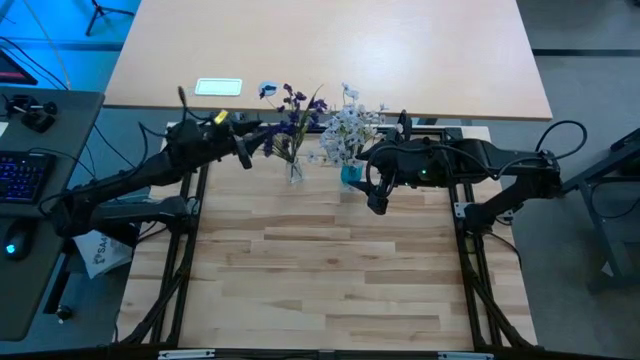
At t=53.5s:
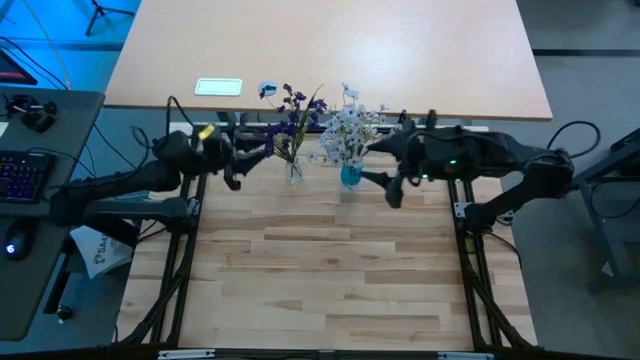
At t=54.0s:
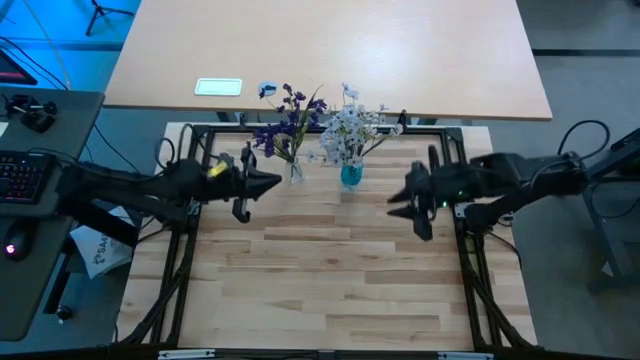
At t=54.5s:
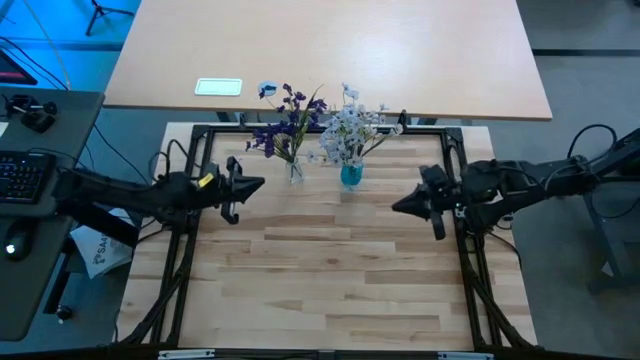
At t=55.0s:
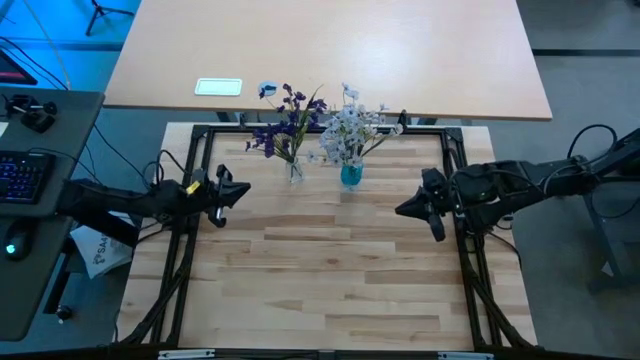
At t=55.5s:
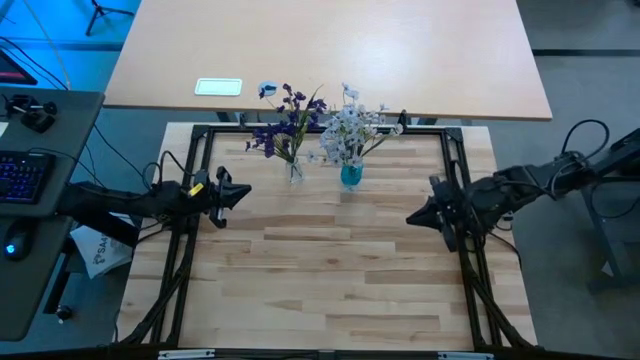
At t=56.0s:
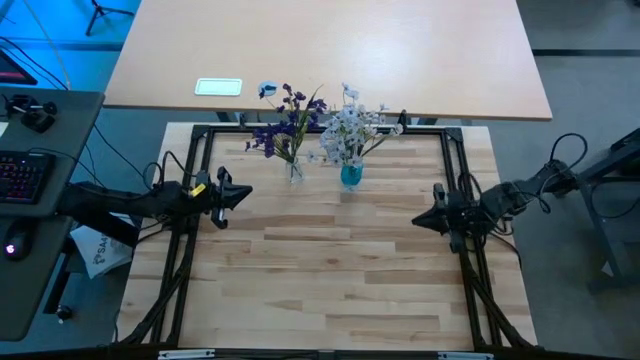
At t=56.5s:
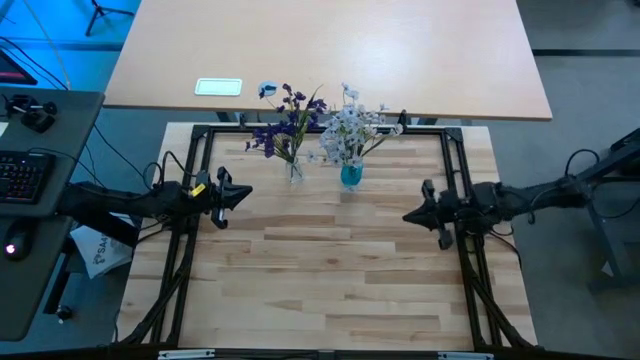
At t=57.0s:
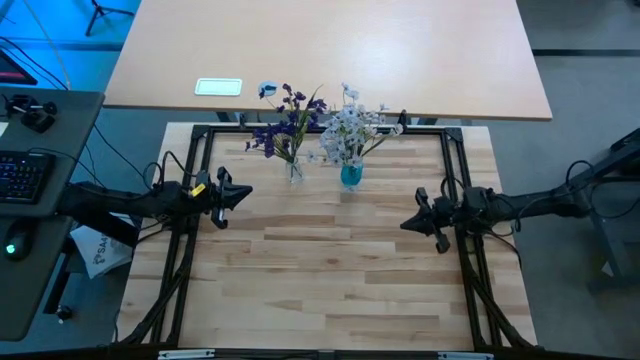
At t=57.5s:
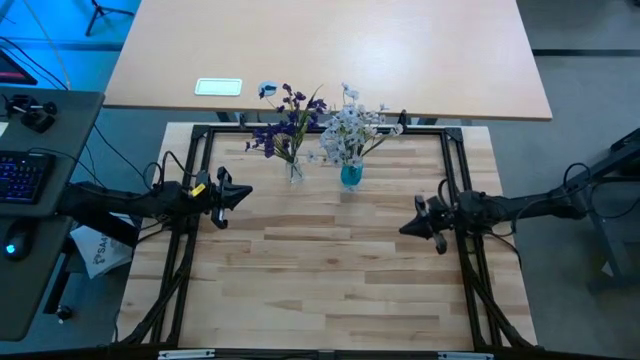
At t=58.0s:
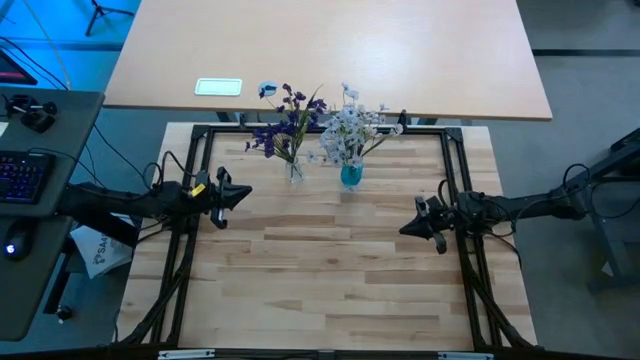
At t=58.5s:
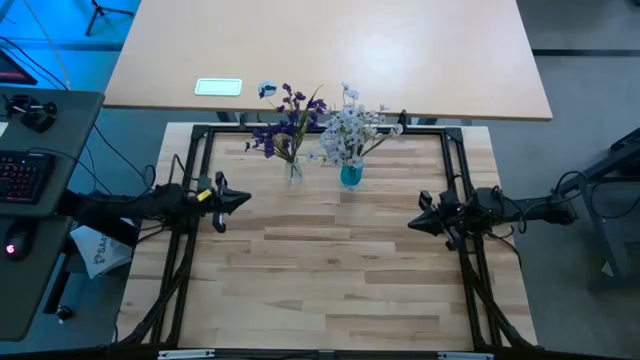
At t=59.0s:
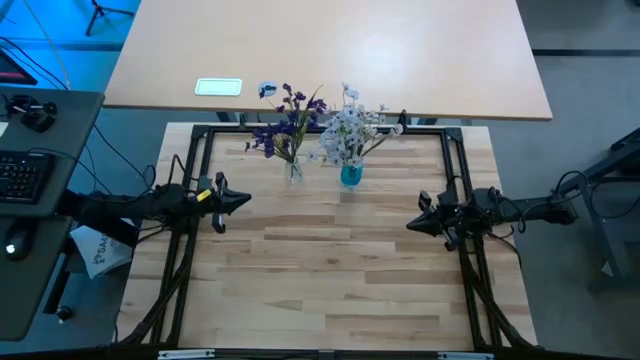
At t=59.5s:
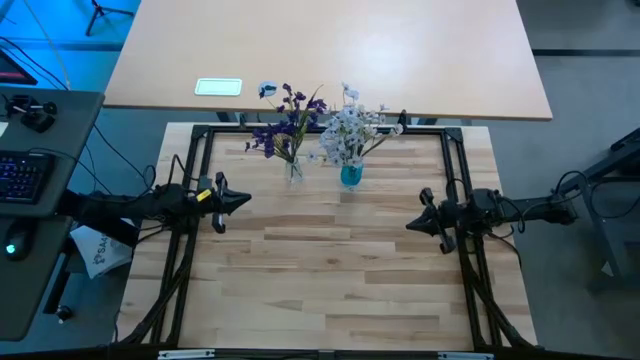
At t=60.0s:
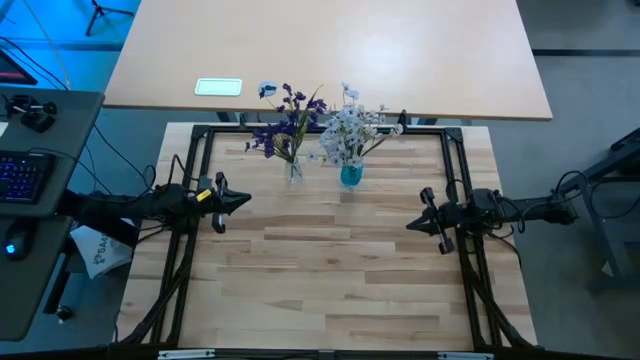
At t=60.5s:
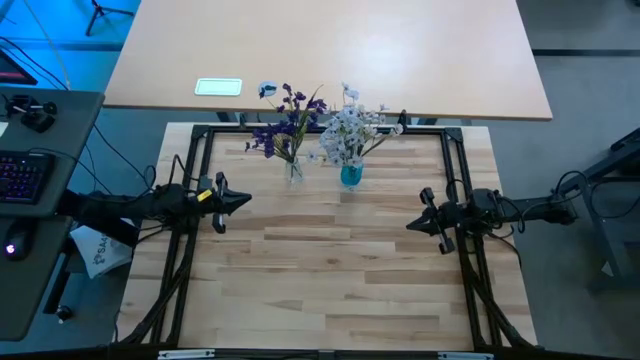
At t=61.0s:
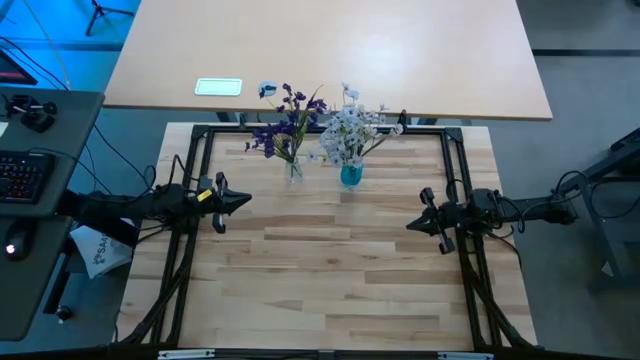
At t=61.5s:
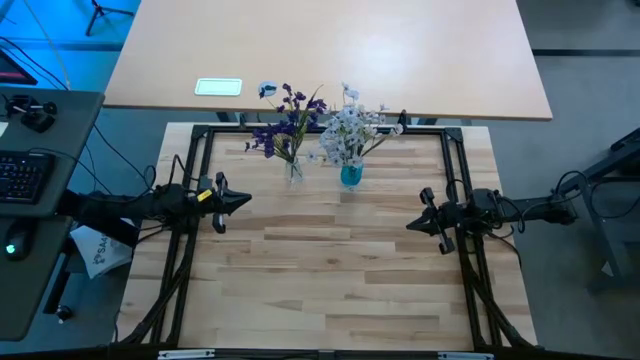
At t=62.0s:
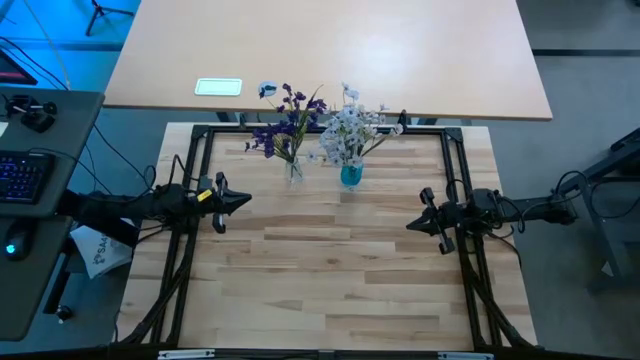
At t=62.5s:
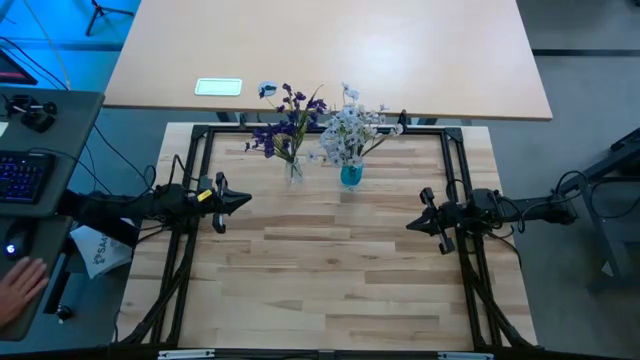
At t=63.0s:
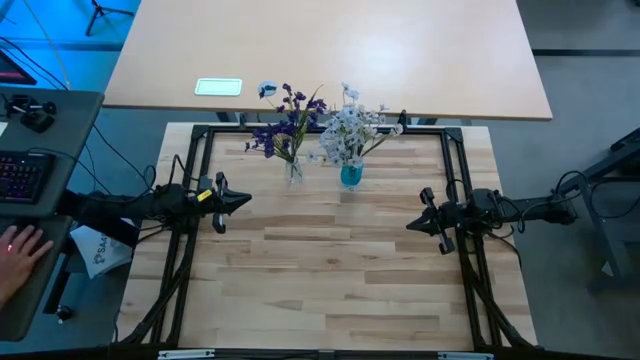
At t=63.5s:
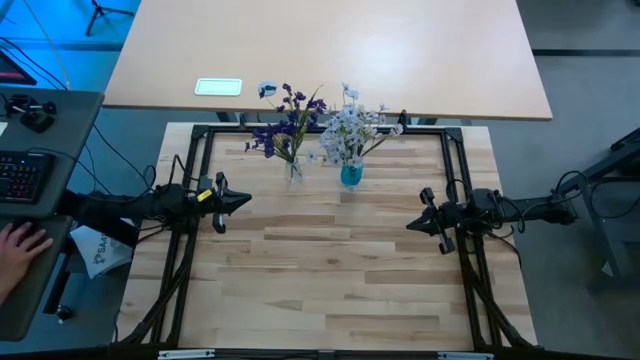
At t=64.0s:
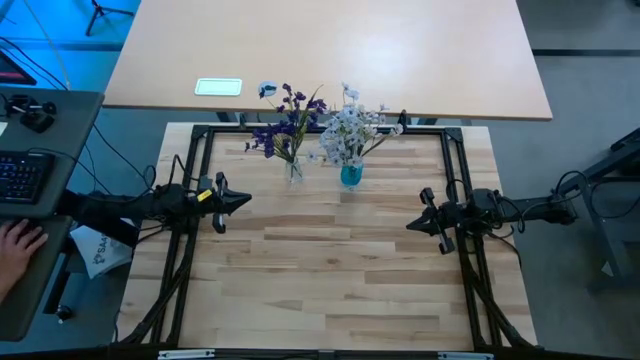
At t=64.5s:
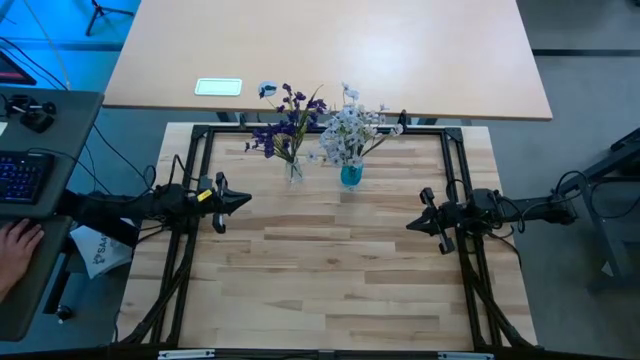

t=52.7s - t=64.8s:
Task: Sort flowers into vase by color
Return to Home Position

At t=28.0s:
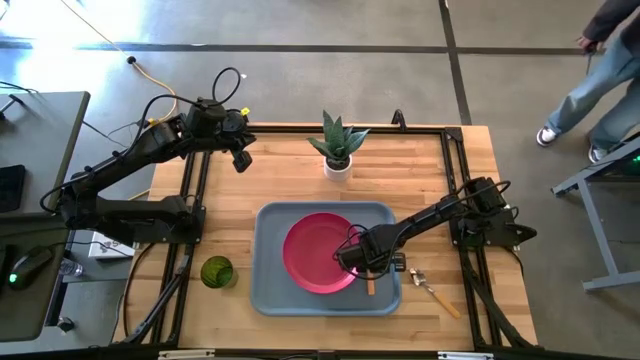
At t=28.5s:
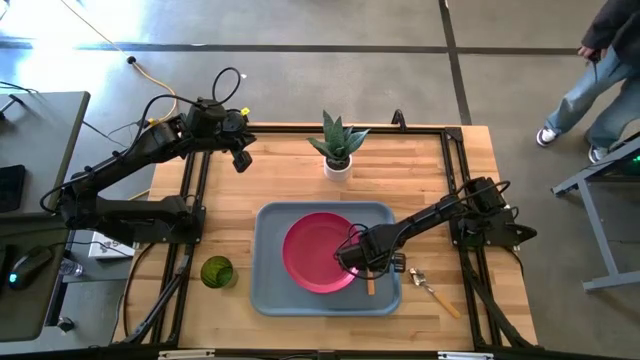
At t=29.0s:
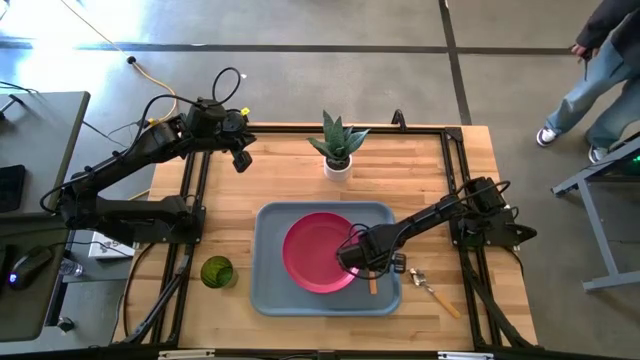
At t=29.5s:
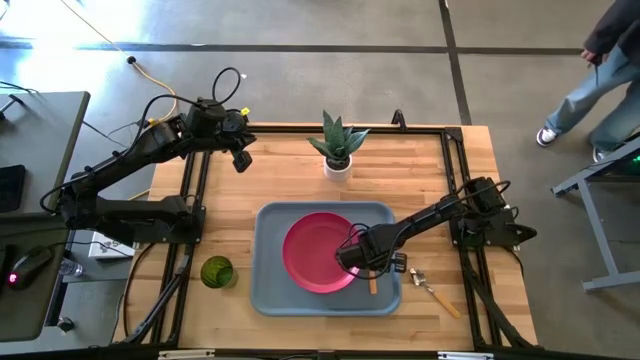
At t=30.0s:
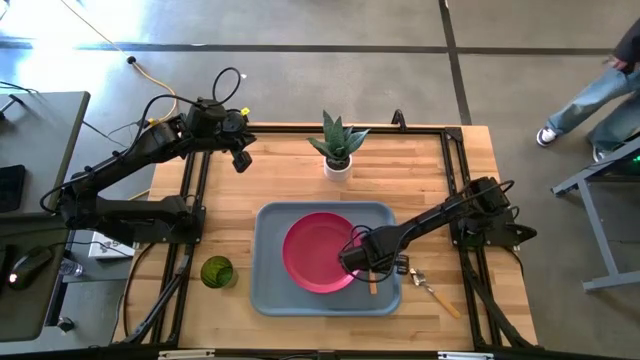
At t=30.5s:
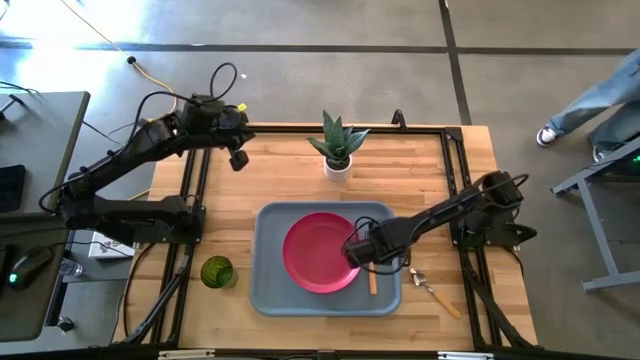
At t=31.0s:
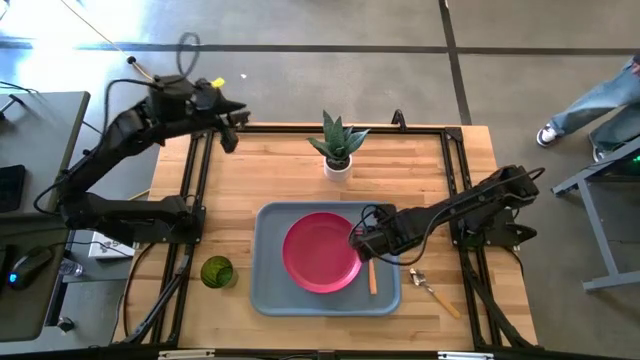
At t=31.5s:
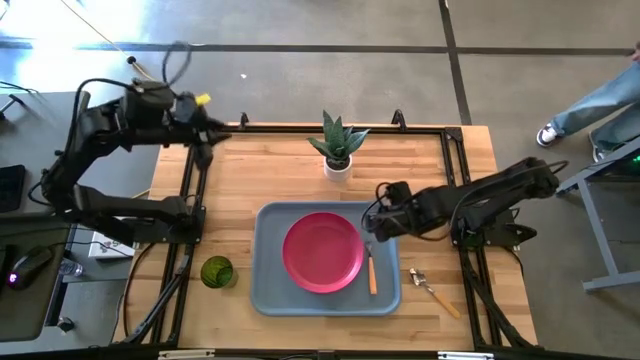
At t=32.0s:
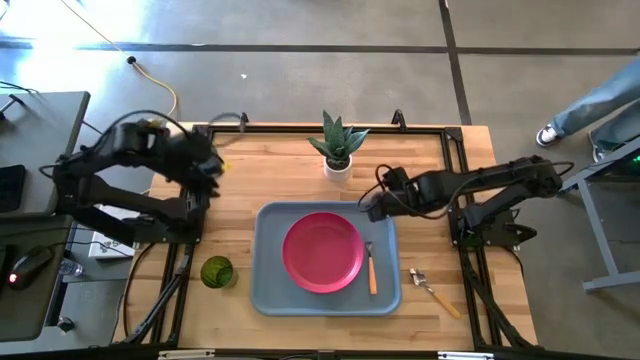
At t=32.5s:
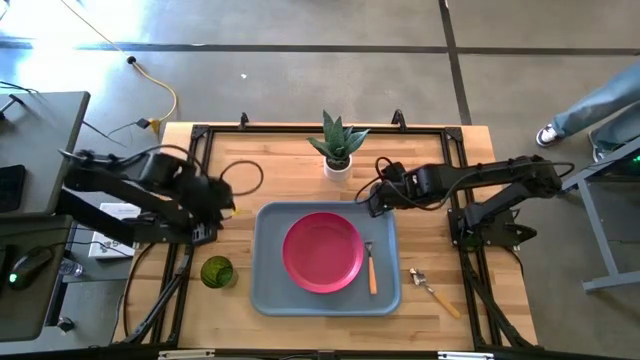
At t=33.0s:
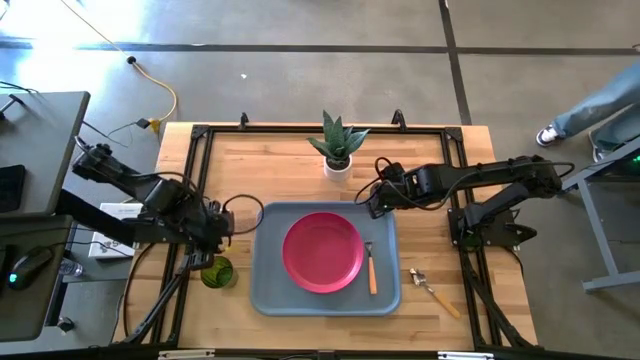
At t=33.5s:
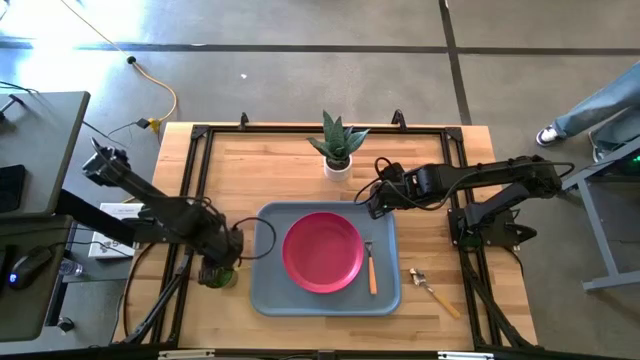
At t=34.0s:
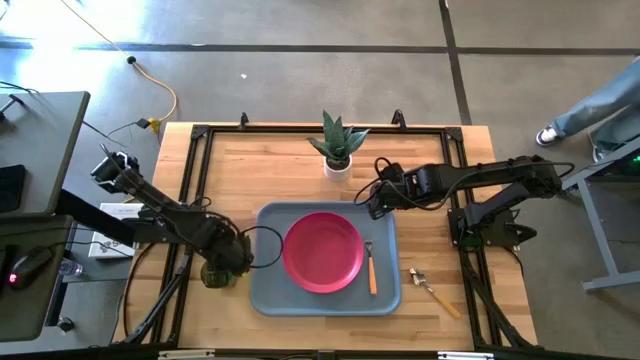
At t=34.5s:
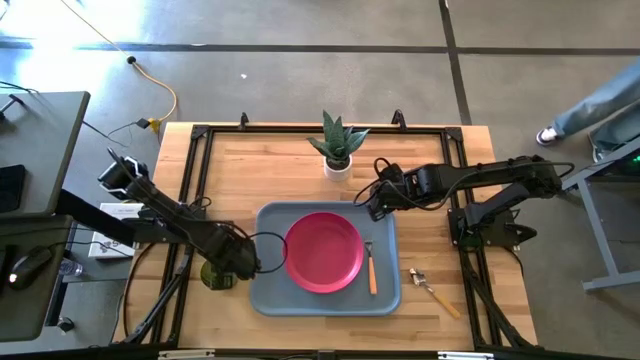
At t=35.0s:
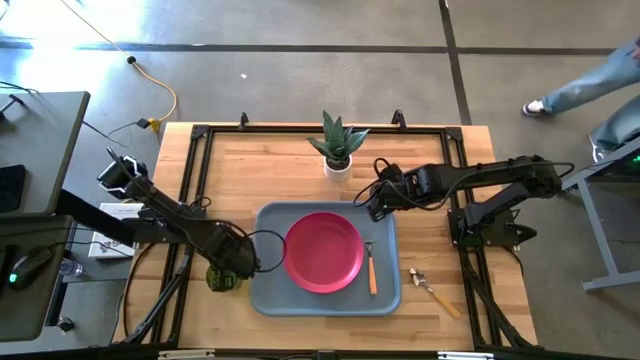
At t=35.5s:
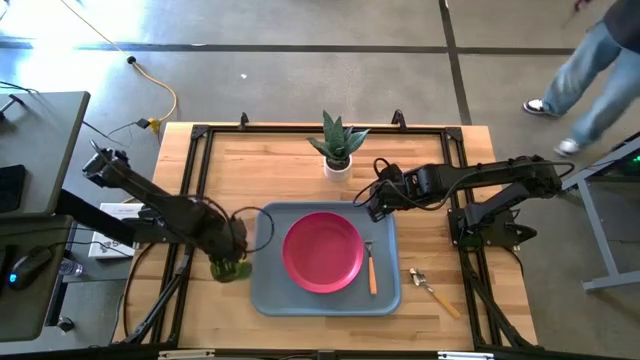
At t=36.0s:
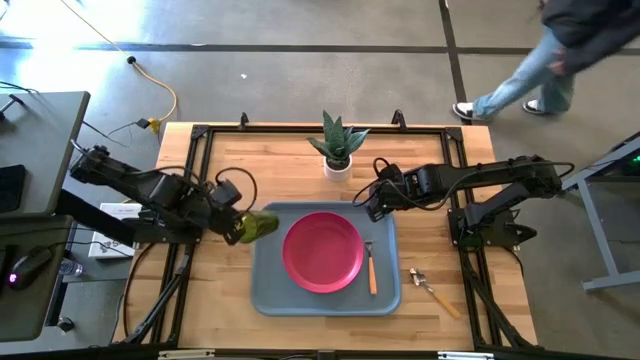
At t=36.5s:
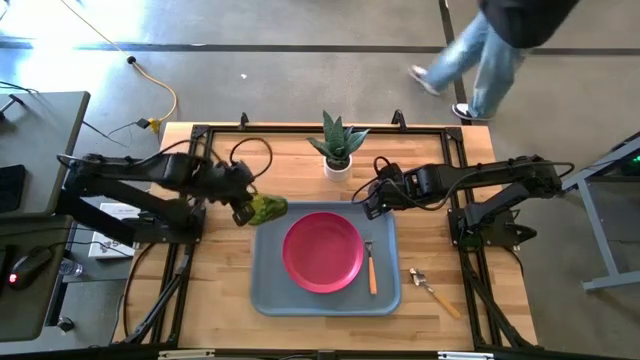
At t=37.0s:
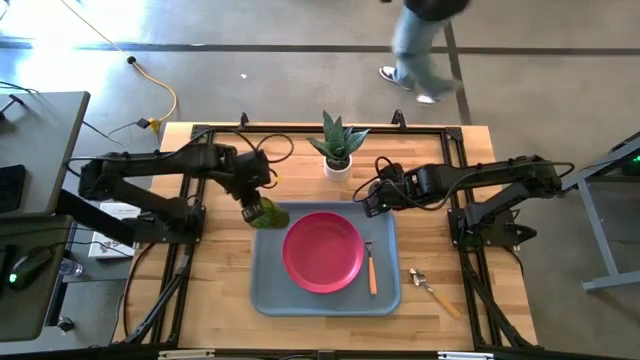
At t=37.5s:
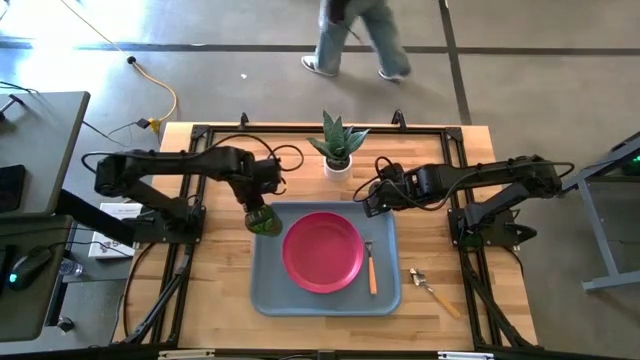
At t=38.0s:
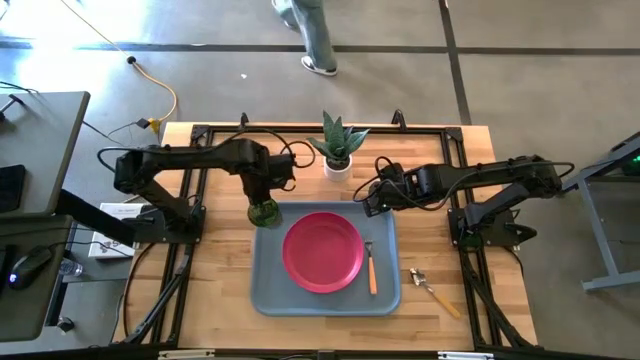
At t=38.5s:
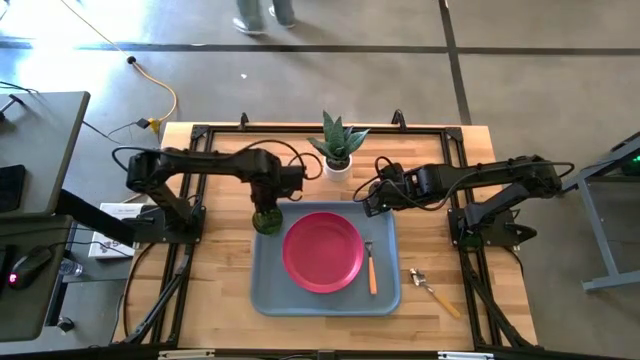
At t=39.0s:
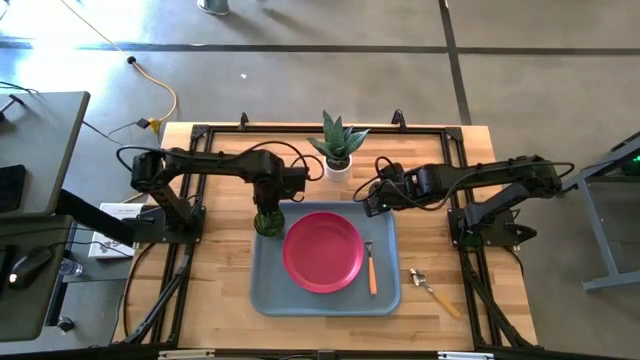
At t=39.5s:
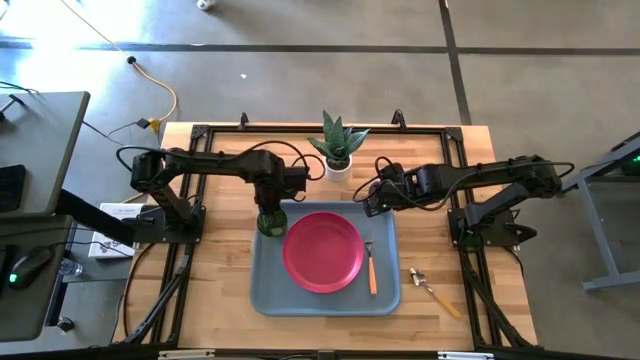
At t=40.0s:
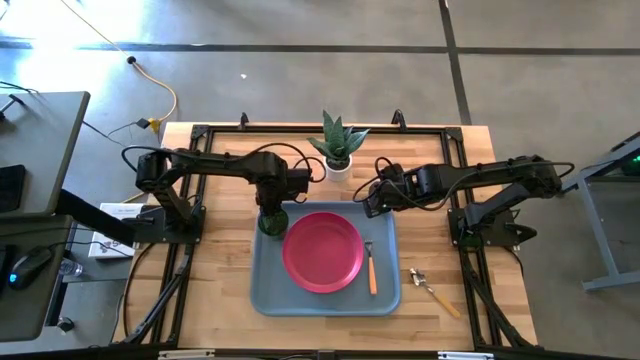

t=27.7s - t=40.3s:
Task: Pick and place plate/cup/fork/spoon on tray
Put the green cup top left of the pink plate on the light blue tray
